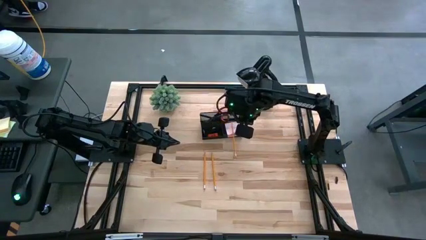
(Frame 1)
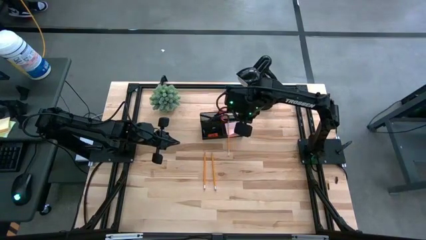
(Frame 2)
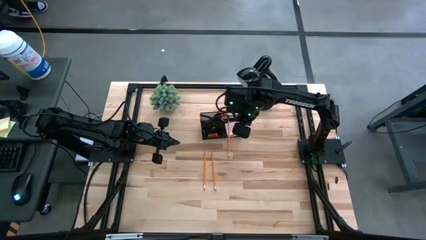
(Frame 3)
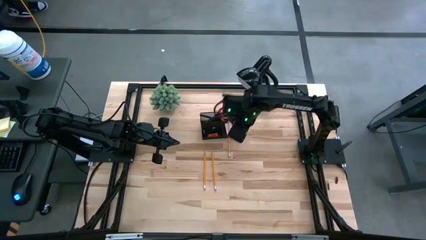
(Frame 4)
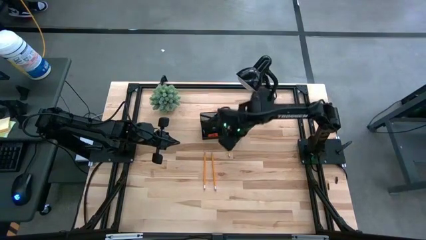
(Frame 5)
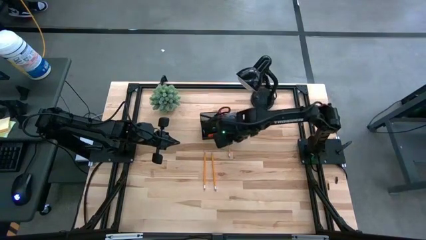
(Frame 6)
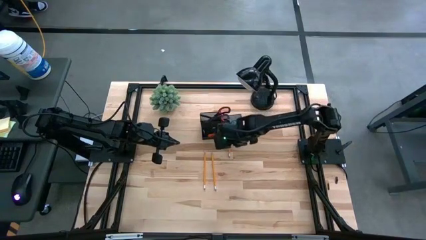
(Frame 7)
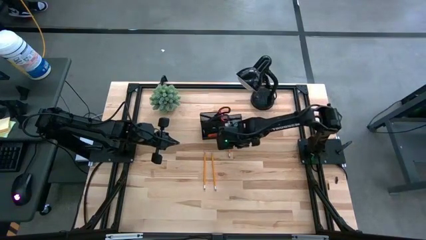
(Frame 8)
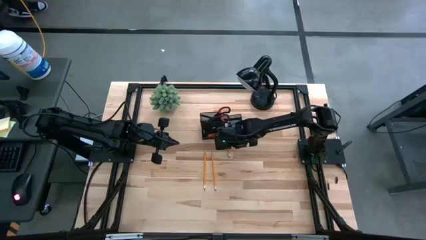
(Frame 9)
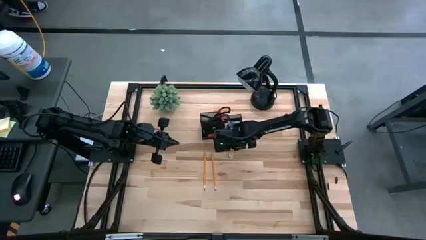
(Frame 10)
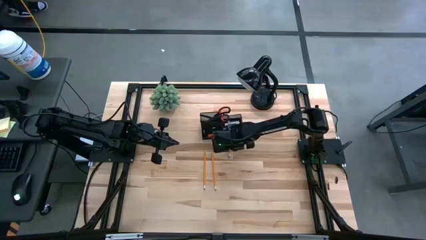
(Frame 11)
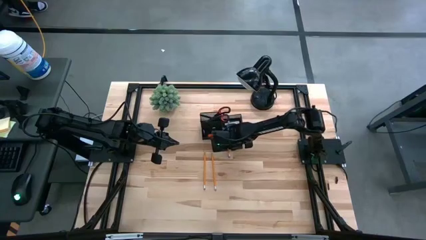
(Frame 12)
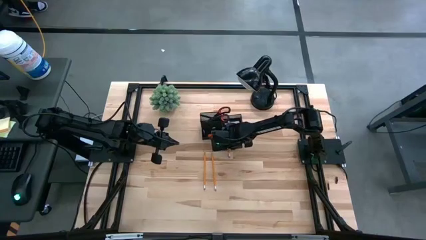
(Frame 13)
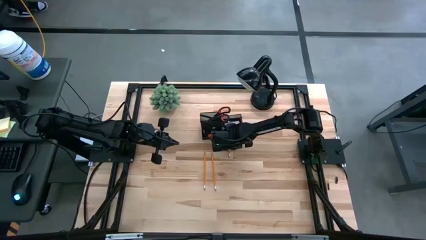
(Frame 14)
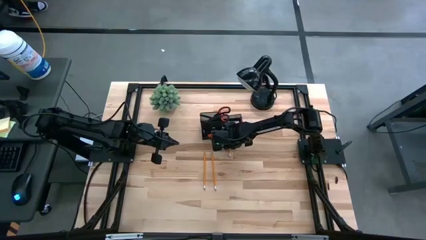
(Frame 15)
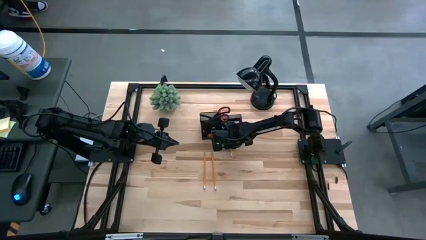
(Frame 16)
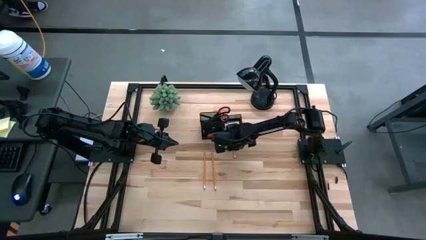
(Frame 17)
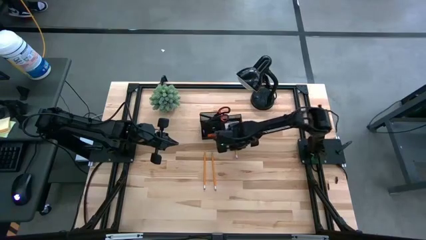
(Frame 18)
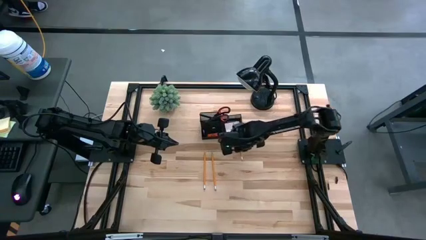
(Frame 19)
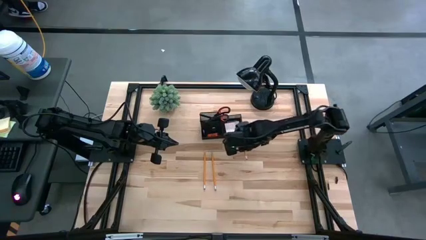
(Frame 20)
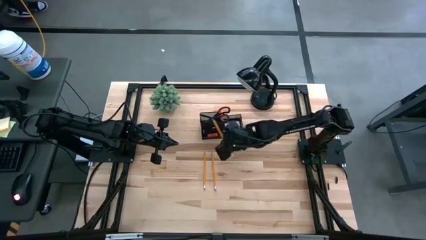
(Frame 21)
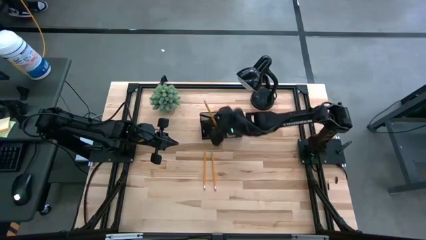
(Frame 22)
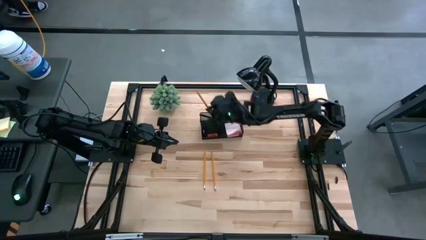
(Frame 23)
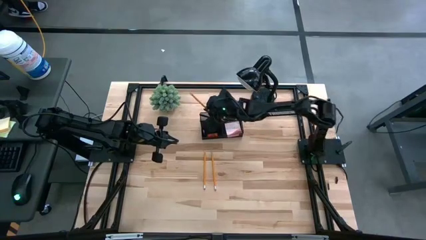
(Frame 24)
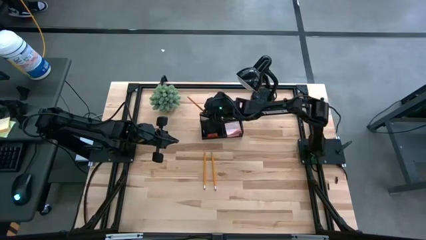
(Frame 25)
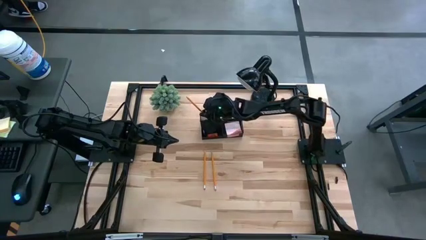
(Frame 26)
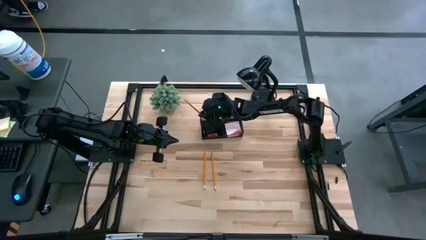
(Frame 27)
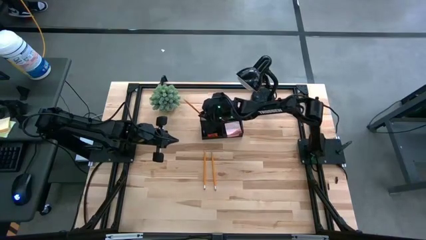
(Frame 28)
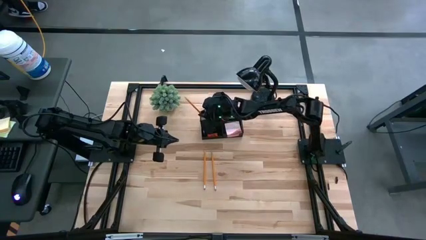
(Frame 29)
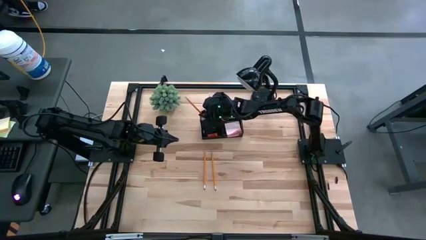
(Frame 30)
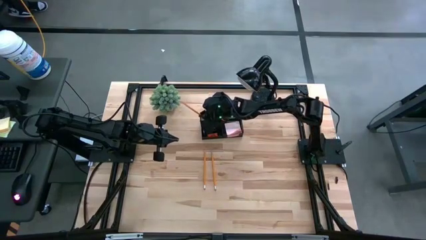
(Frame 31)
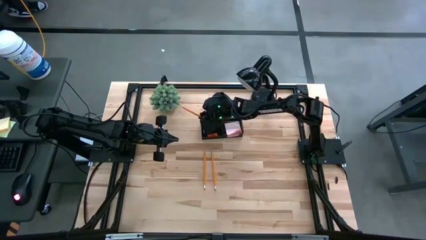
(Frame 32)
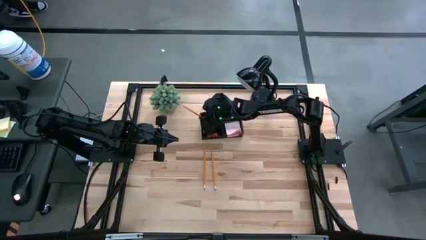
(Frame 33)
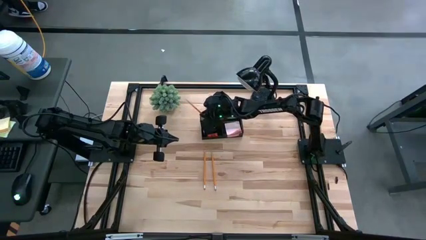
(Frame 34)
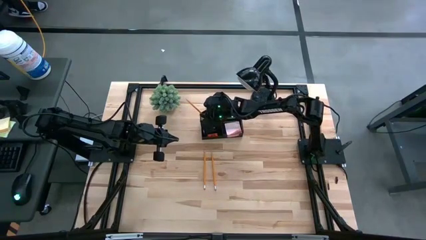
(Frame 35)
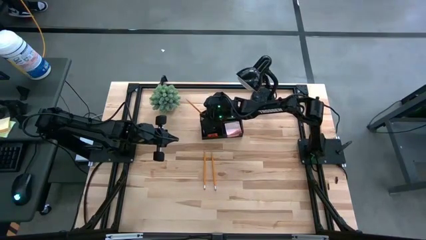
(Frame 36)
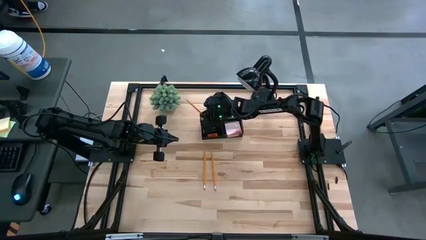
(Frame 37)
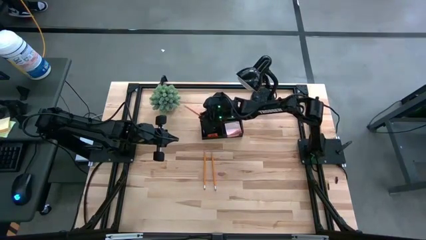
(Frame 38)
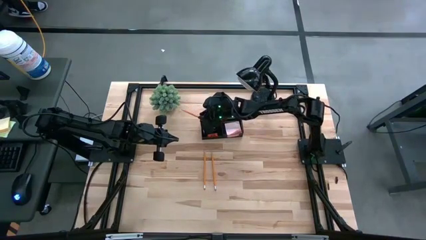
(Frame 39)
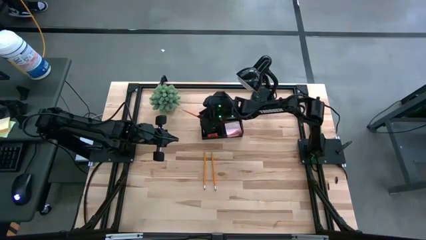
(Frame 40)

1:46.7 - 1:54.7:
Task: Pick and place office supplies into organizer
Put the top pencil into the desk organizer

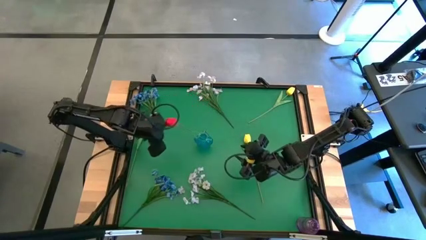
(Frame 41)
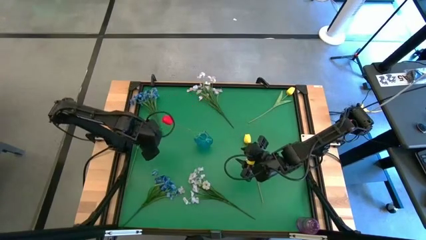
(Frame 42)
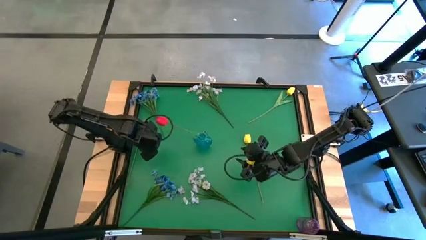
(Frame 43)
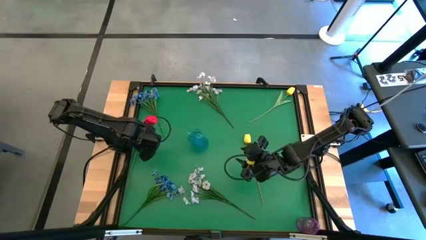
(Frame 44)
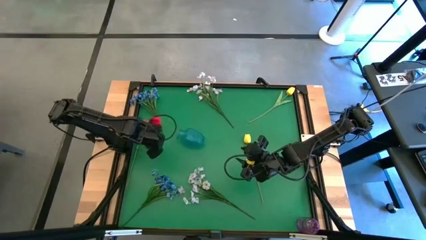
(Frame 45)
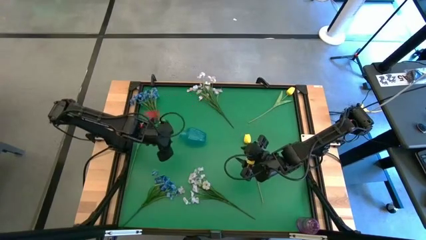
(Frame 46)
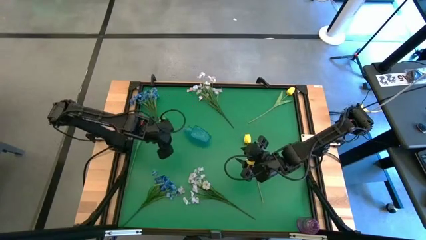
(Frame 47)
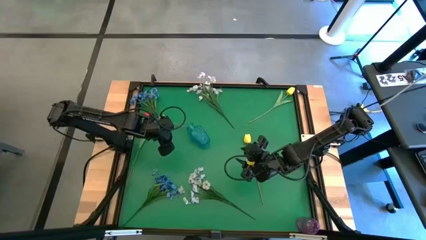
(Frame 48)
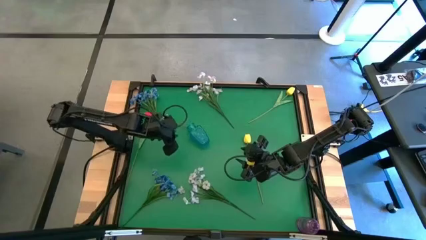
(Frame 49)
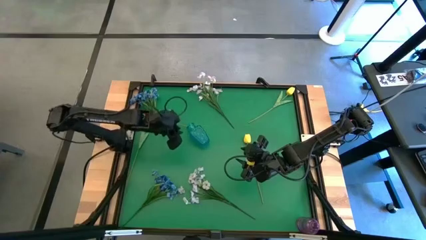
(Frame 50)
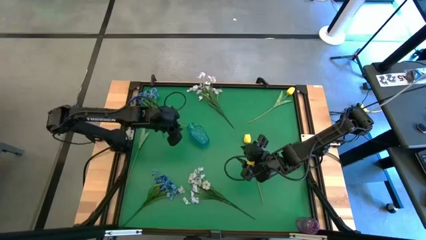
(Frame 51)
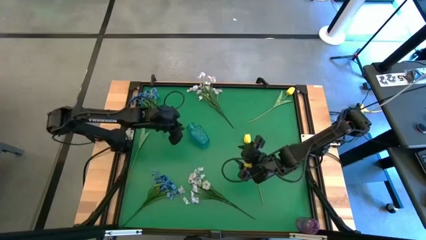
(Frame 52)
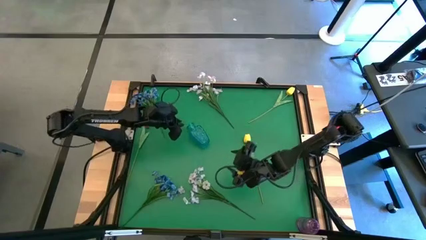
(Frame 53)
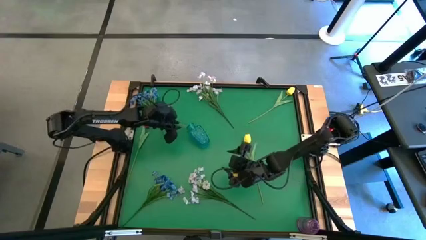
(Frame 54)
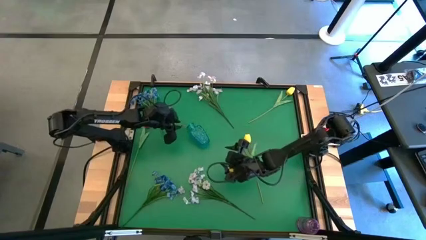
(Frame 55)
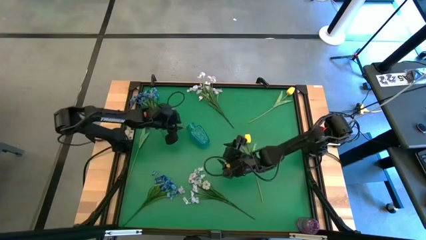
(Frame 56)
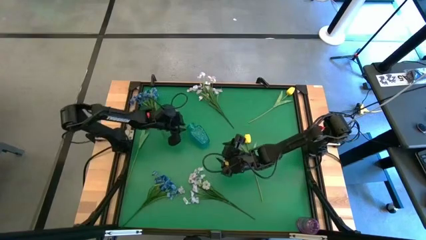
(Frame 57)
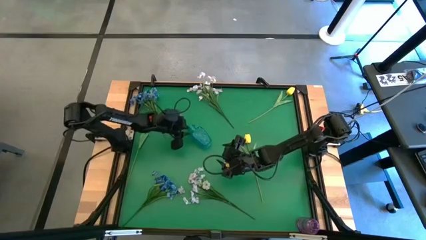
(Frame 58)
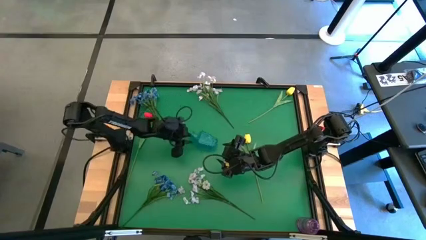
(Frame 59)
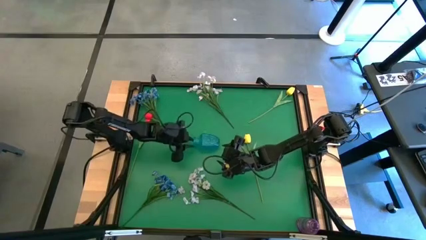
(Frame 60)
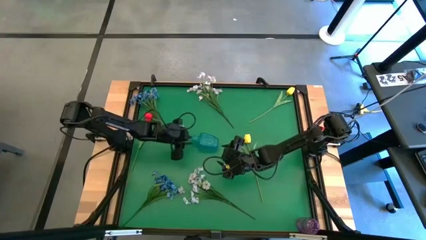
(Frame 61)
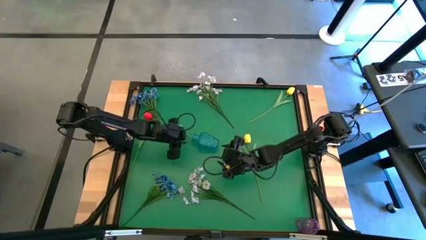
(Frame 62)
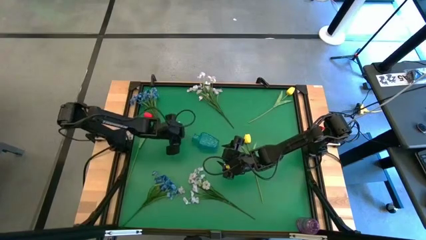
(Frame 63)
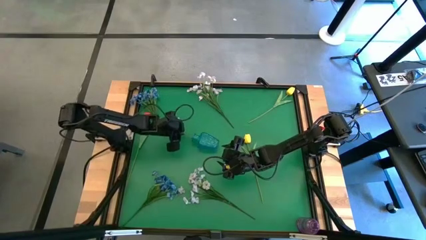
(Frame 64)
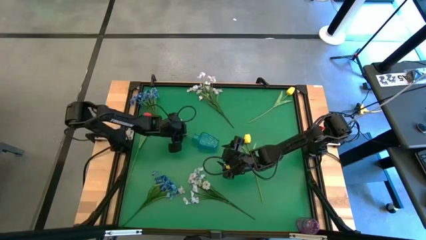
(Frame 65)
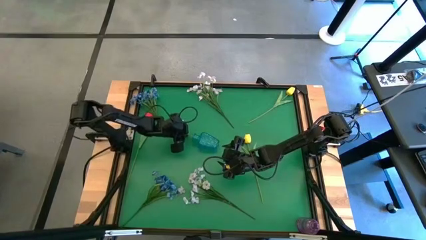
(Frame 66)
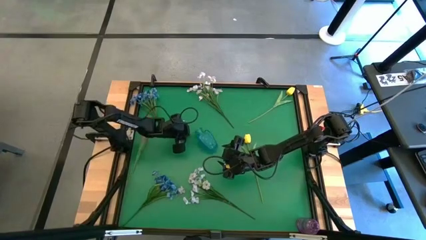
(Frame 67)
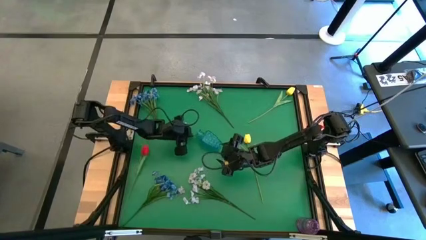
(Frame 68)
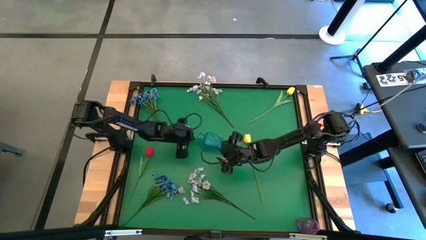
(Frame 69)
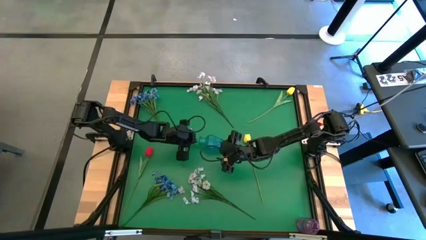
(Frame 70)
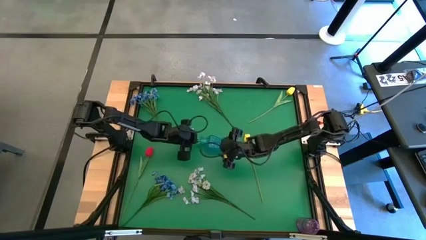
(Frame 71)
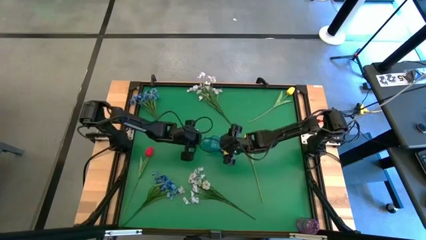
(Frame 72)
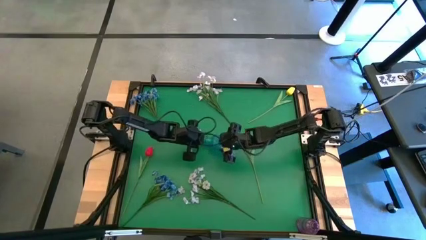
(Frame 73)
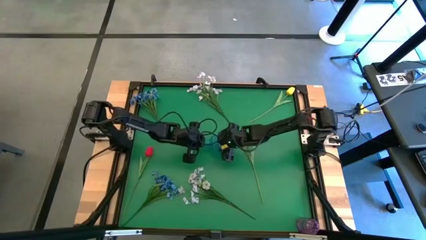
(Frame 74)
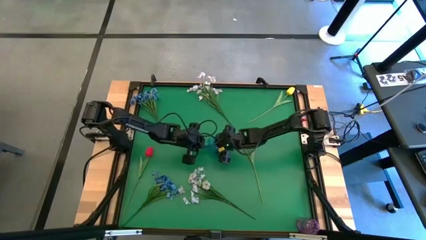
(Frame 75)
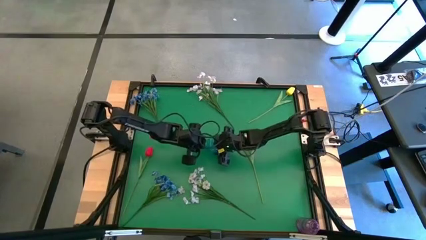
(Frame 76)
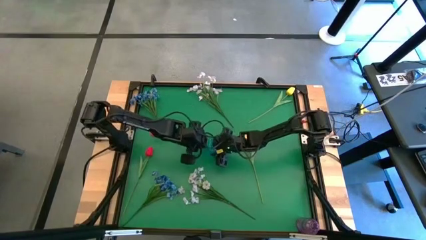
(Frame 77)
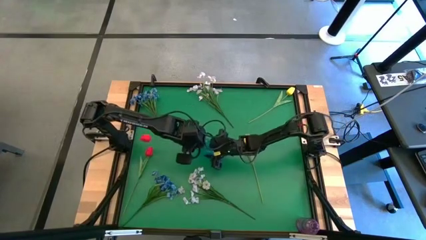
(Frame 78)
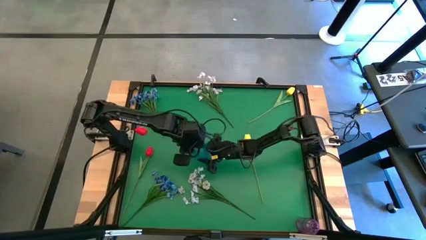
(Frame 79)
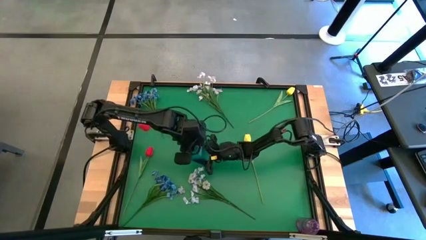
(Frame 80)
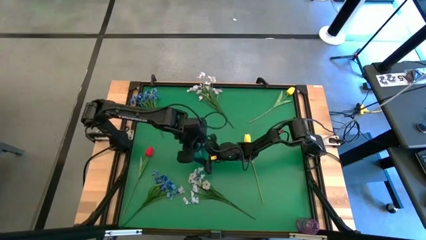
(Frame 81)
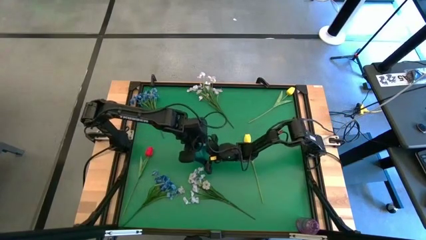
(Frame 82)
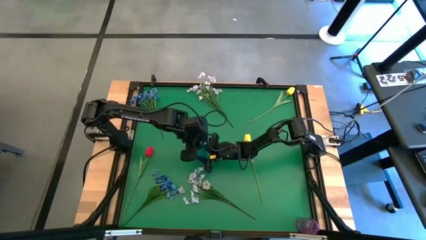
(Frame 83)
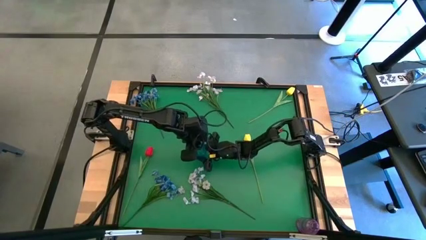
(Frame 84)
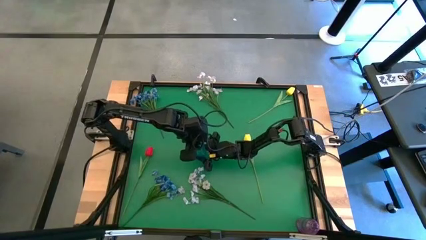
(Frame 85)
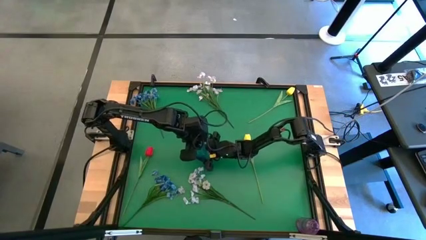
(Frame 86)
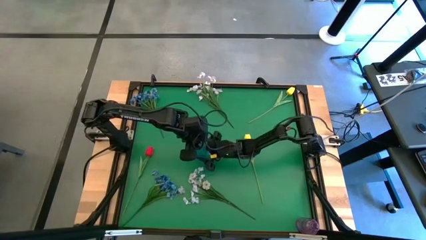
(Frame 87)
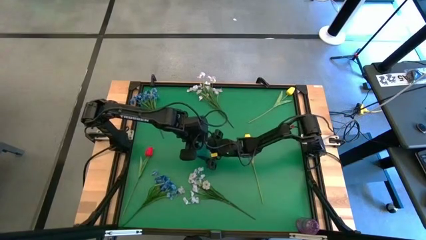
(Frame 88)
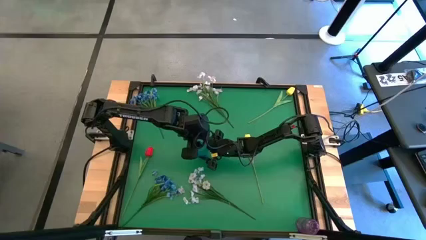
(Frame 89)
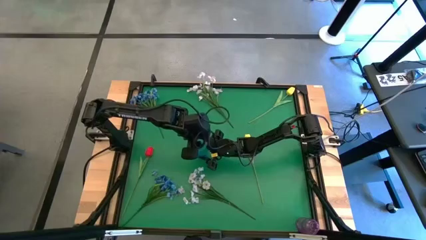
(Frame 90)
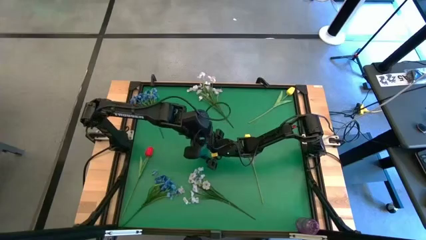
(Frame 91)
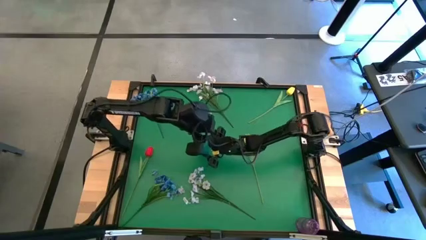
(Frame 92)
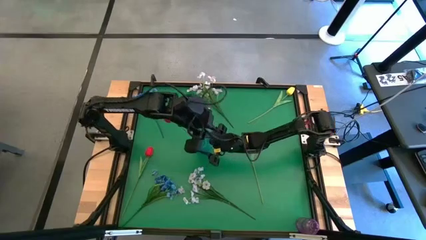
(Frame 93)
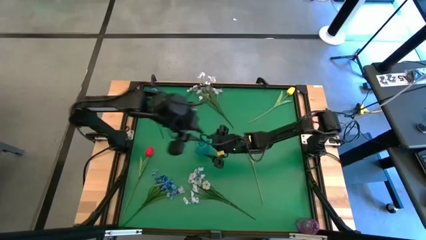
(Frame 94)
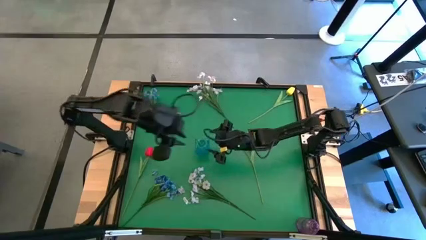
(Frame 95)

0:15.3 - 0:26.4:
Task: Sort flowers into vase by color
Adjust the blue vase
